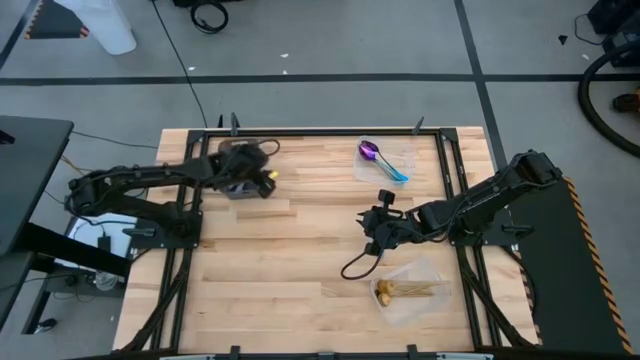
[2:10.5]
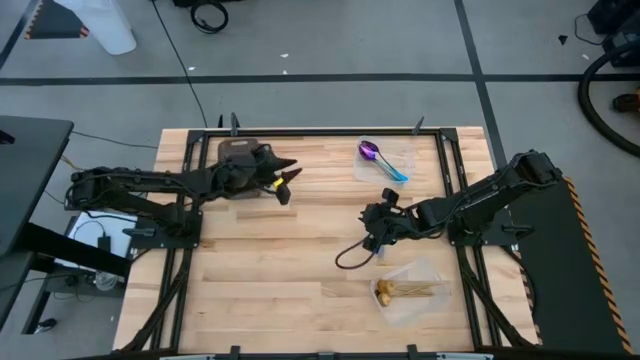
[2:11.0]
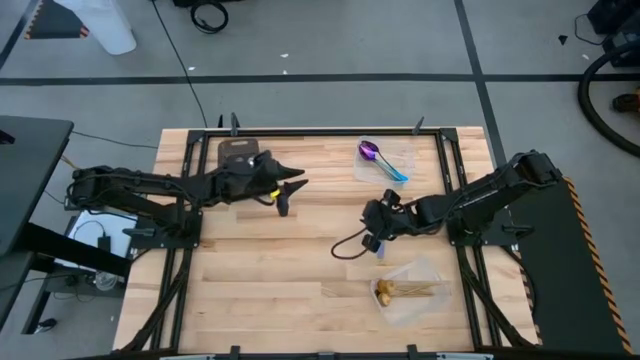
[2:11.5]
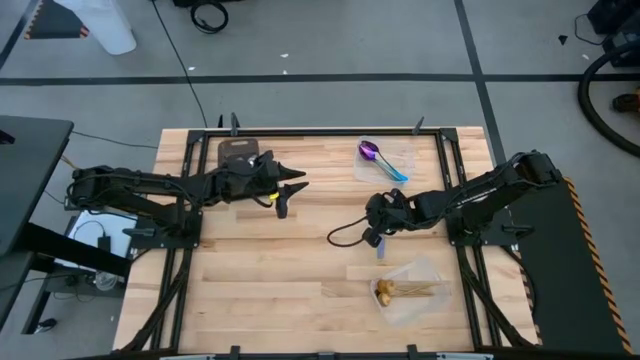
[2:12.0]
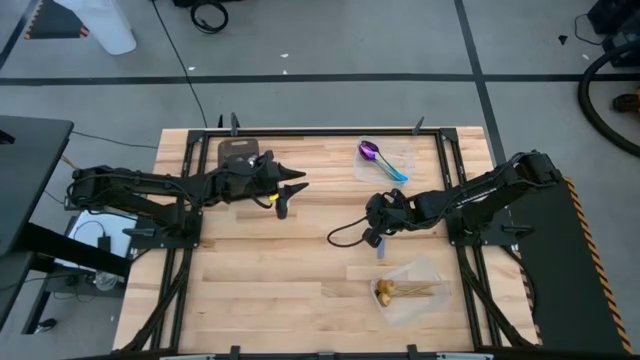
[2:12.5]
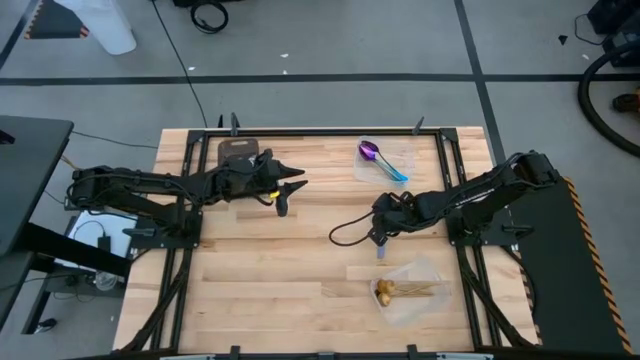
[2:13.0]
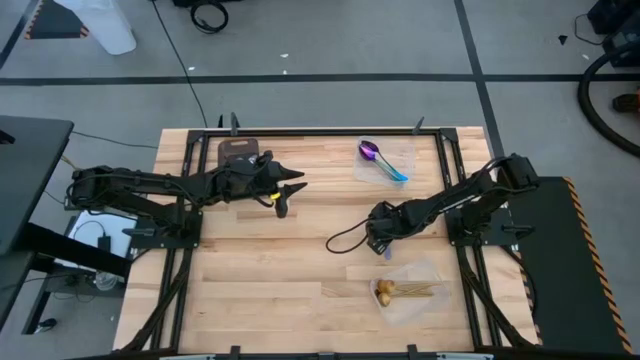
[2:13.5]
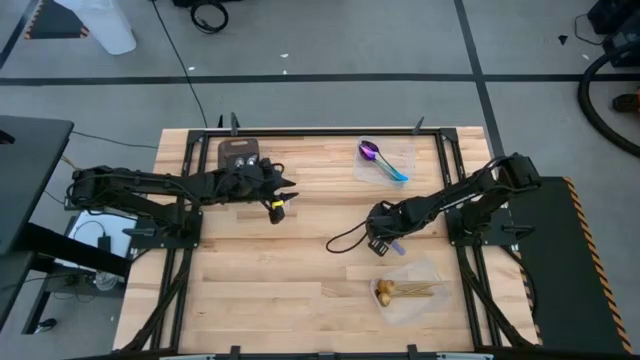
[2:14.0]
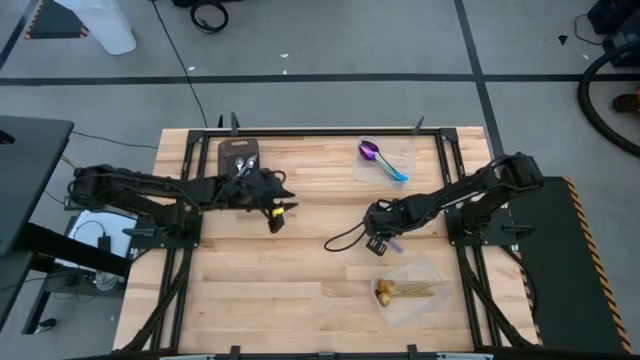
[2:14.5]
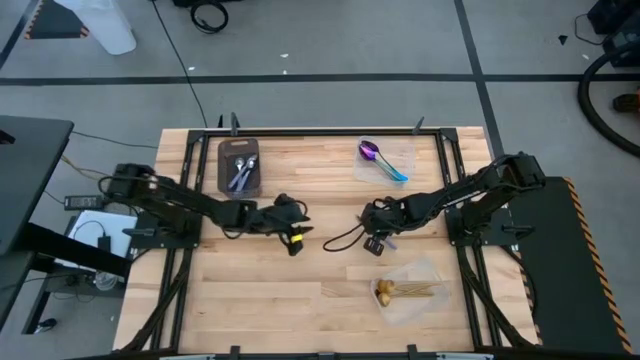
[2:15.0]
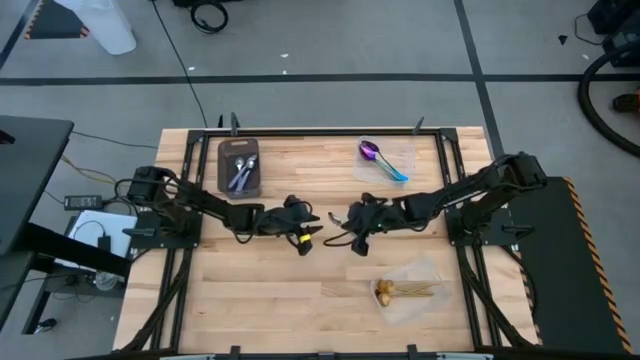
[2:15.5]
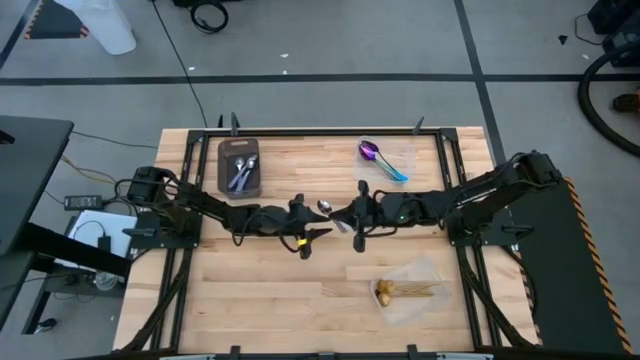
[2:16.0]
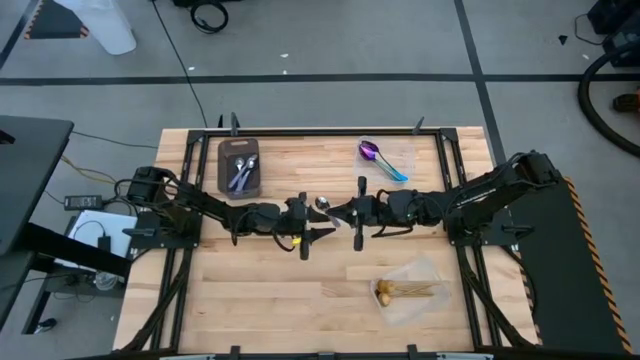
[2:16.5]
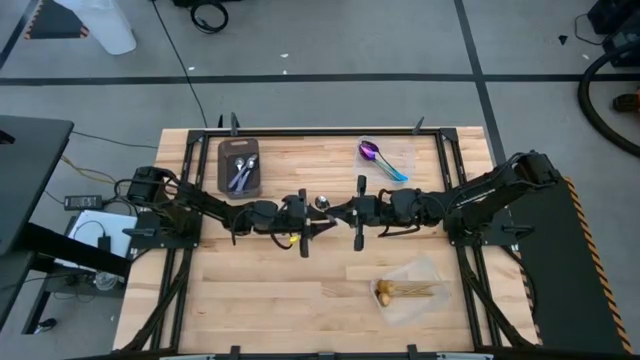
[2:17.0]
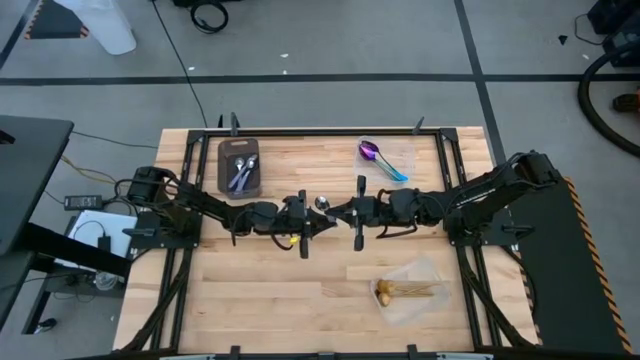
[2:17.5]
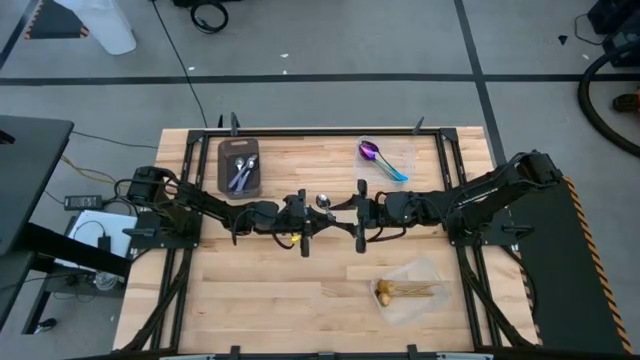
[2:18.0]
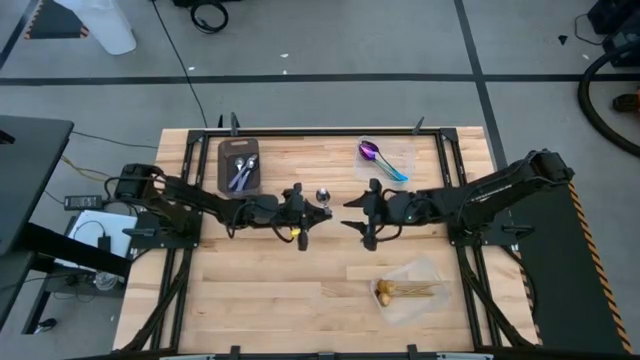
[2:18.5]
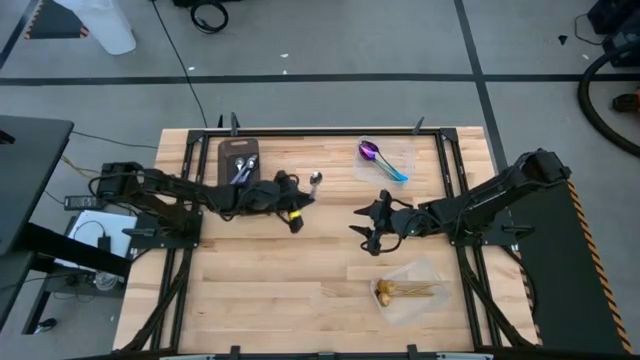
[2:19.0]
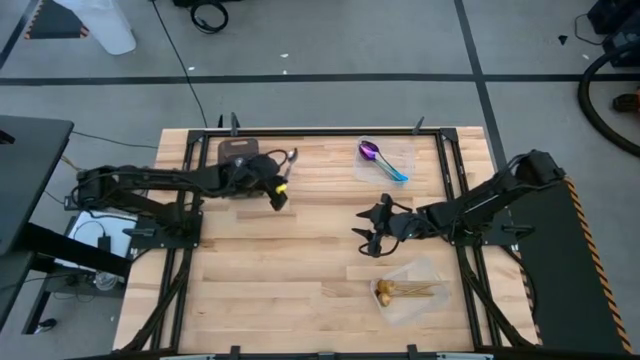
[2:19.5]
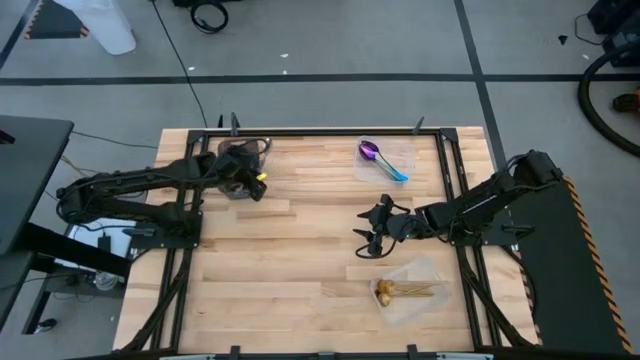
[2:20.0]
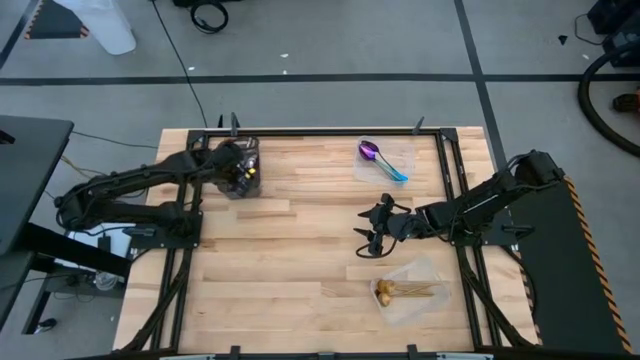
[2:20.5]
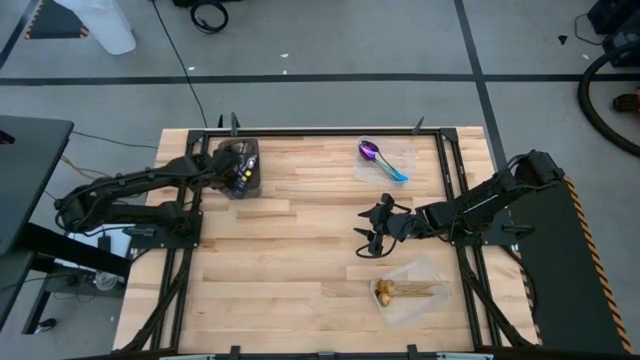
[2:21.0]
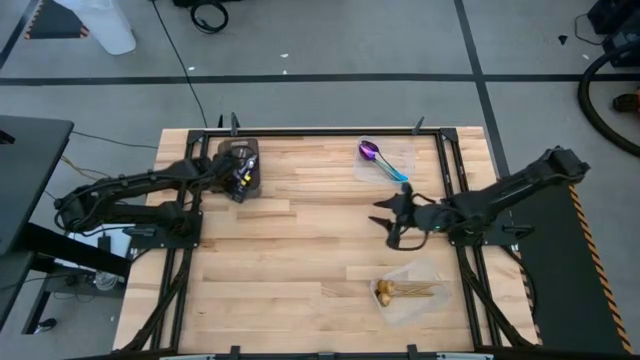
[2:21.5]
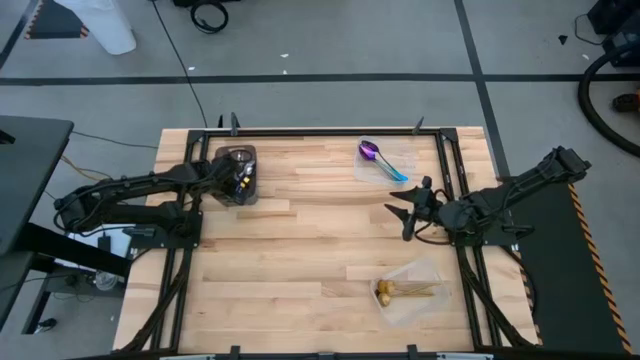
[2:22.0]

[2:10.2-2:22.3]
Task: Sort silverware by color (type)
Put the purple spoon into the black bin

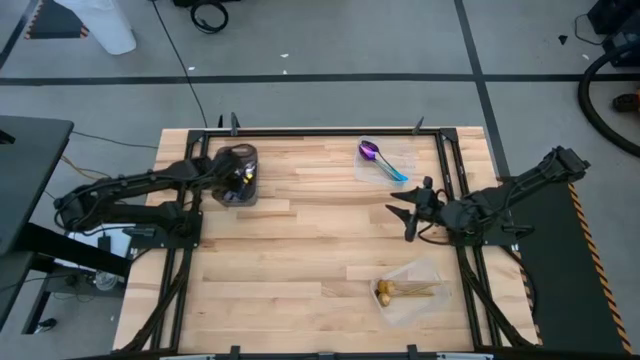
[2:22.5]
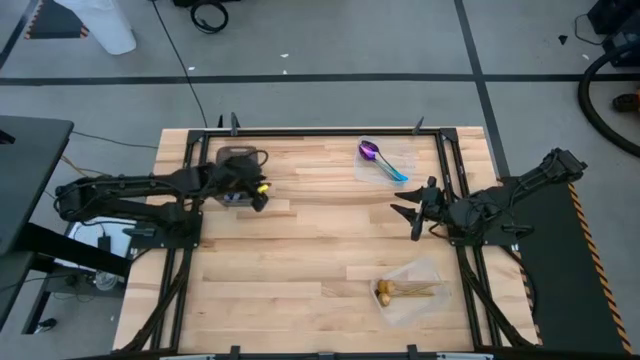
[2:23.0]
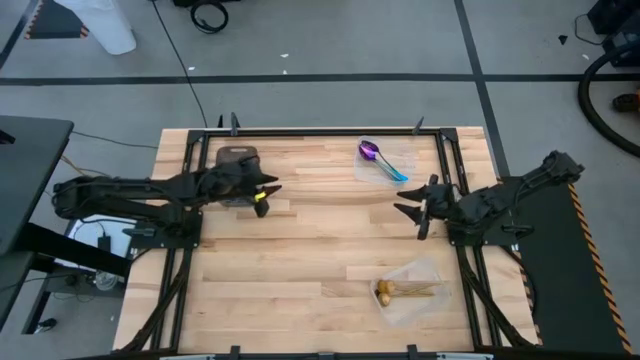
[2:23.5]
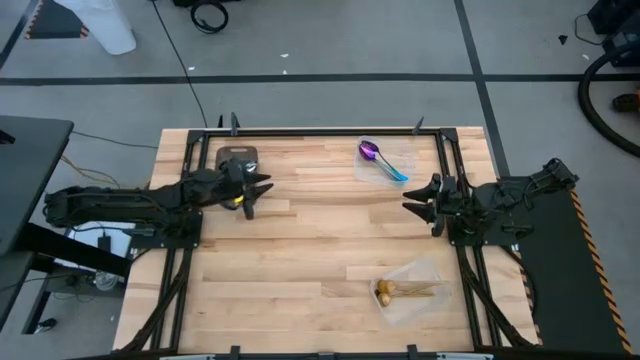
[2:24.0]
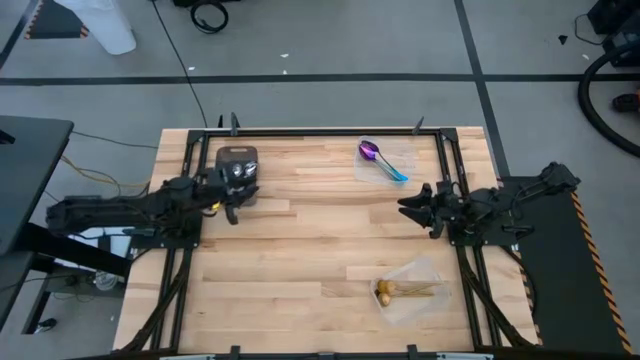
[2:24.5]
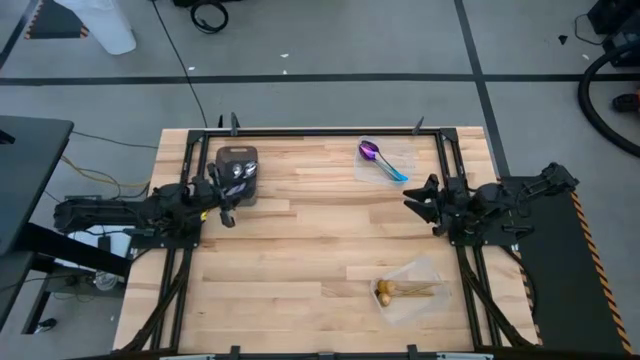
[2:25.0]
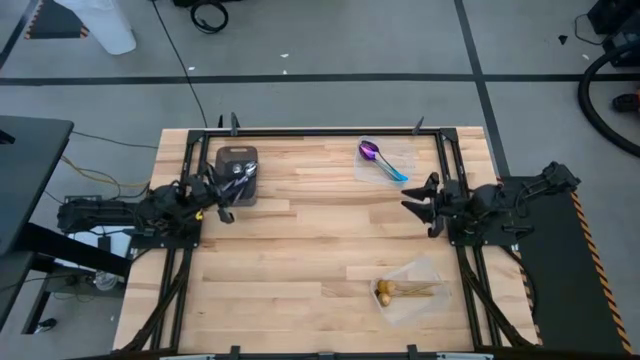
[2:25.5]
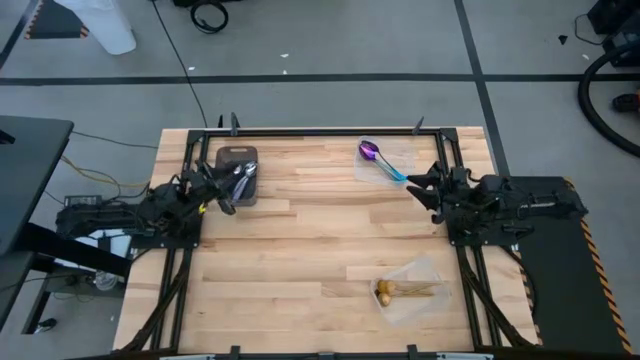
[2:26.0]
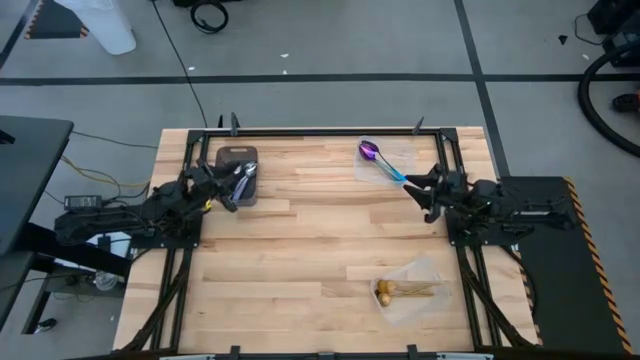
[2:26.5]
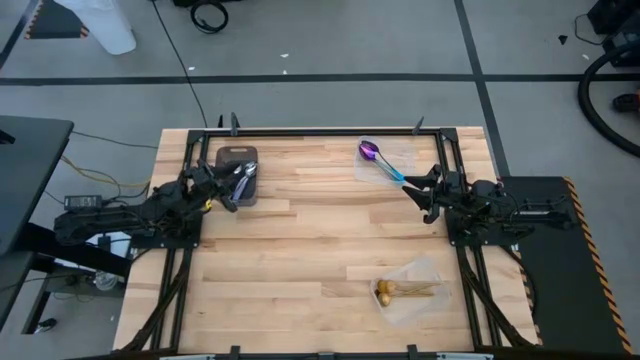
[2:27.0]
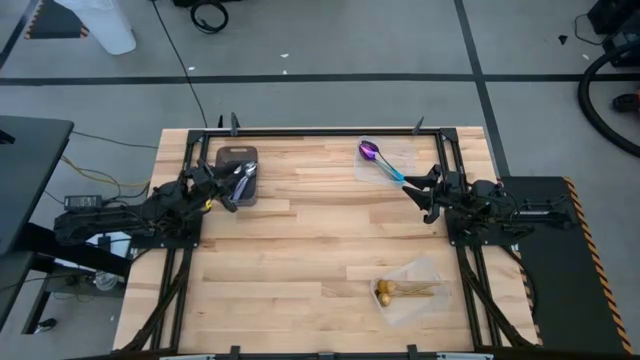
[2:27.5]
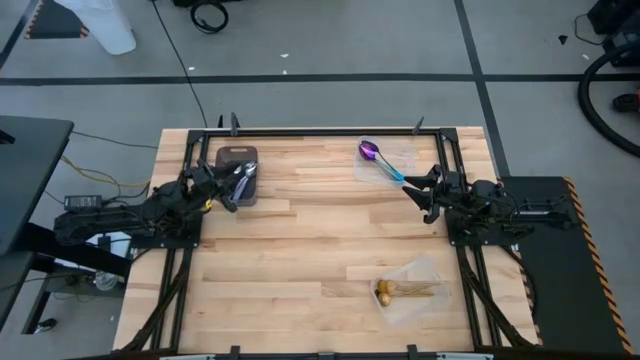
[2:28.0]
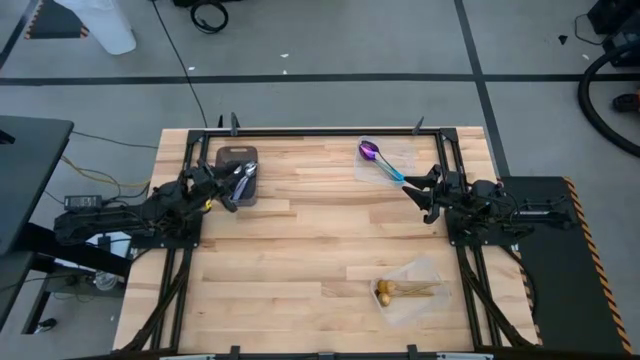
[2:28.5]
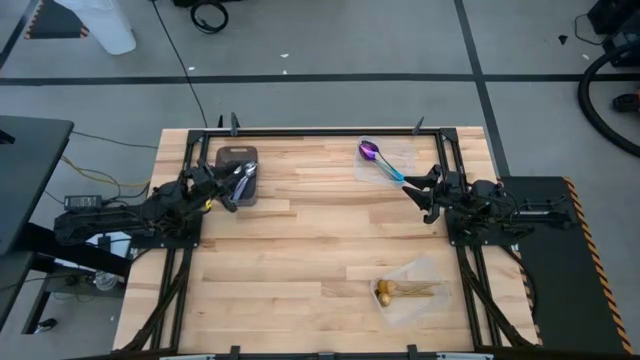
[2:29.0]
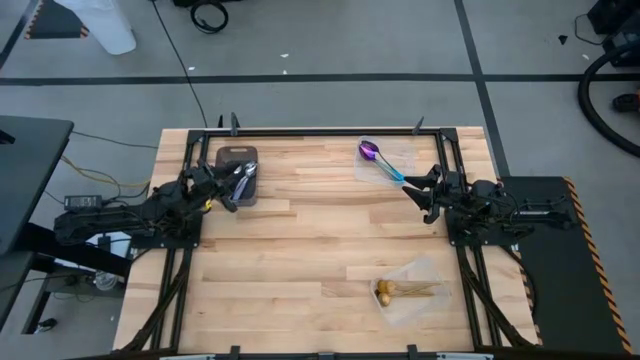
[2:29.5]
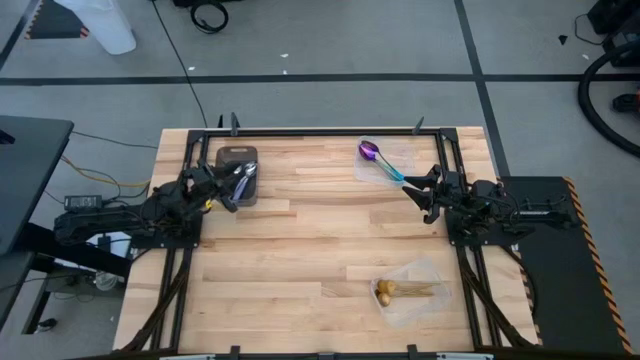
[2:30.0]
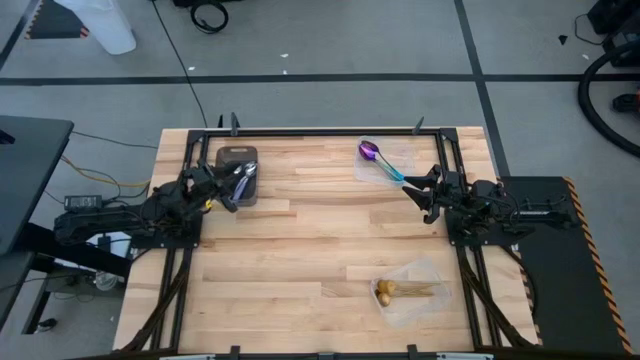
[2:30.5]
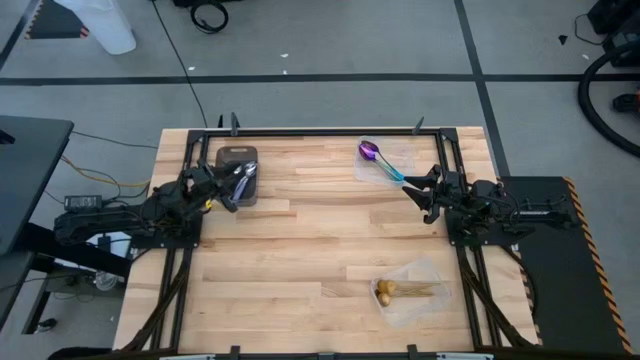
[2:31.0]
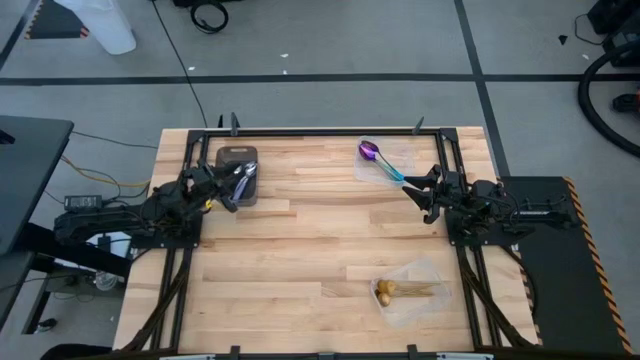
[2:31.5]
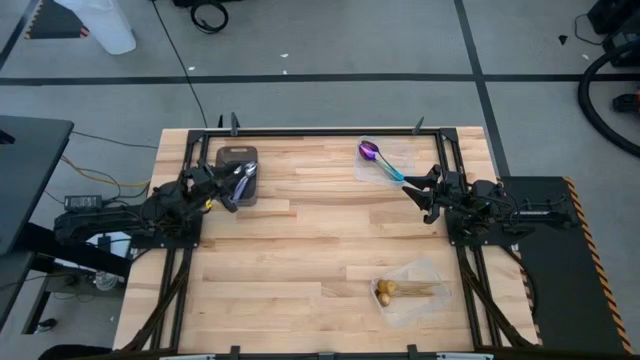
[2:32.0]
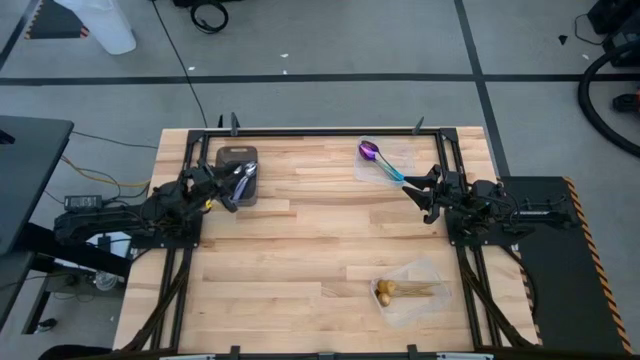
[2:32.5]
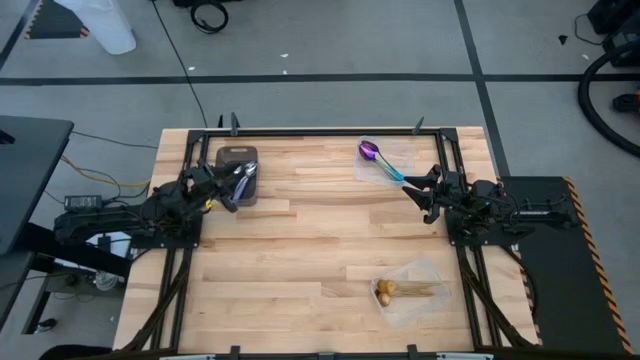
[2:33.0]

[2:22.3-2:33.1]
Return to Home Position
